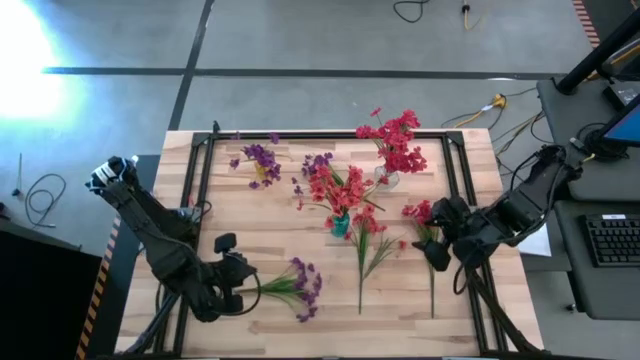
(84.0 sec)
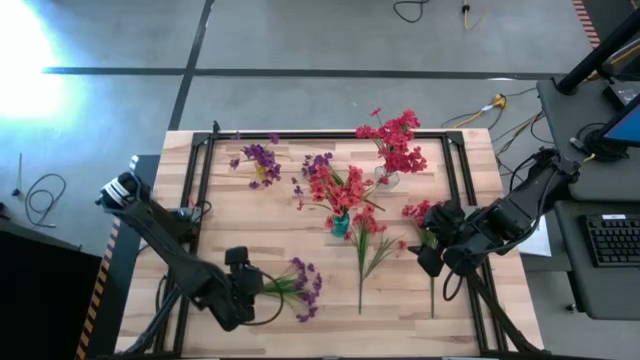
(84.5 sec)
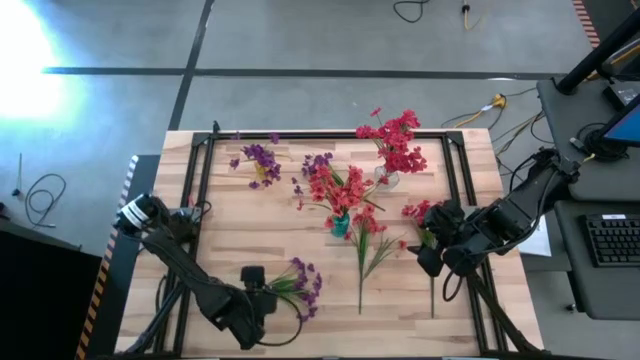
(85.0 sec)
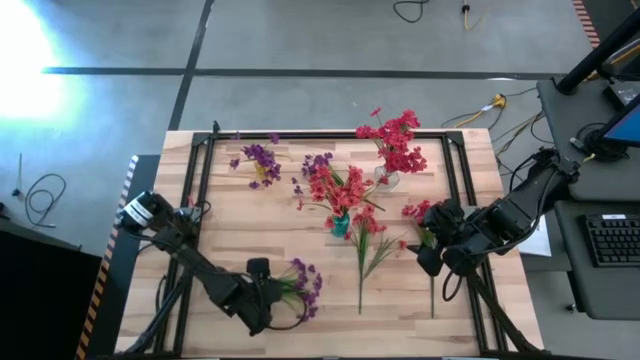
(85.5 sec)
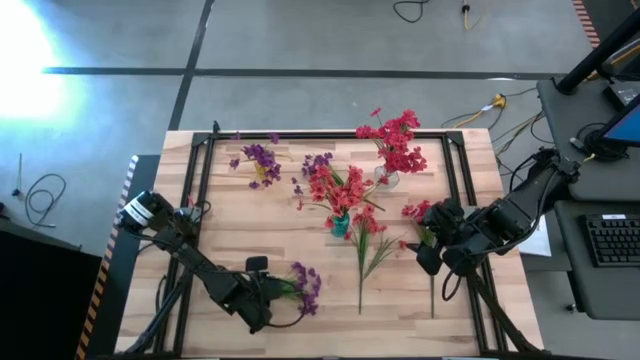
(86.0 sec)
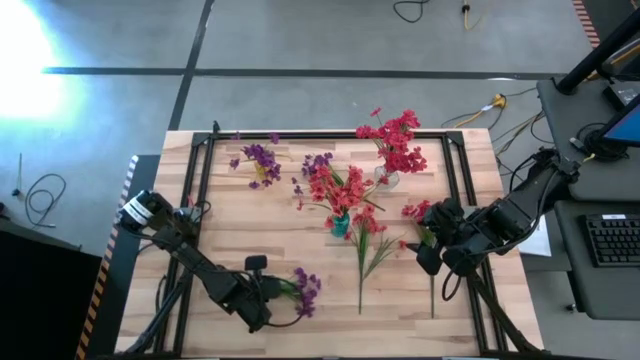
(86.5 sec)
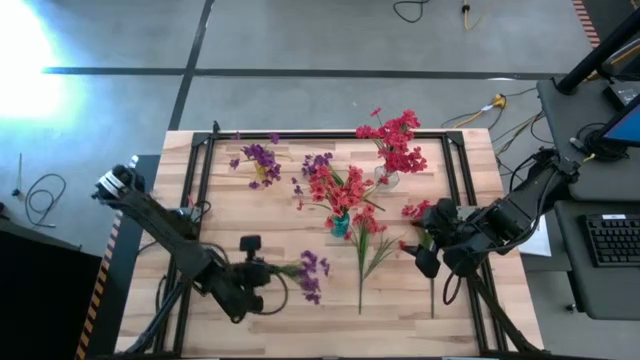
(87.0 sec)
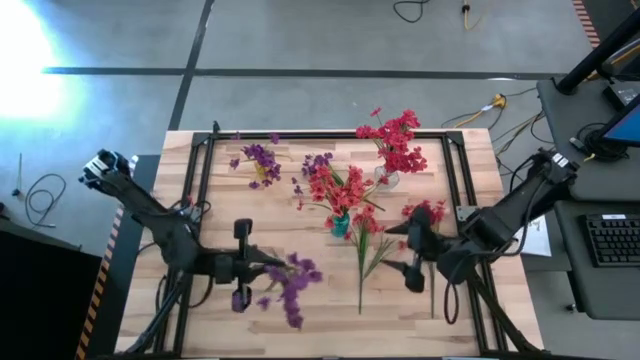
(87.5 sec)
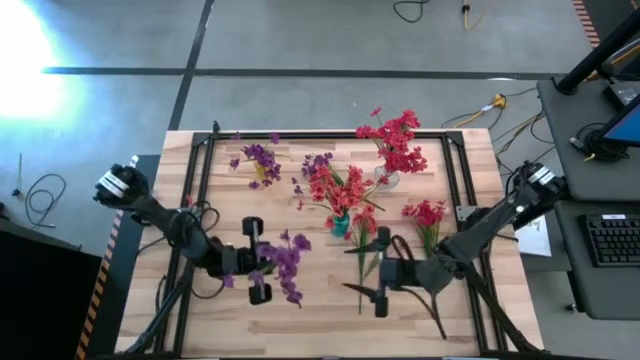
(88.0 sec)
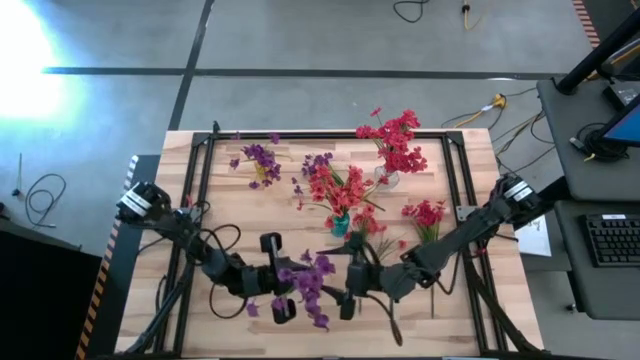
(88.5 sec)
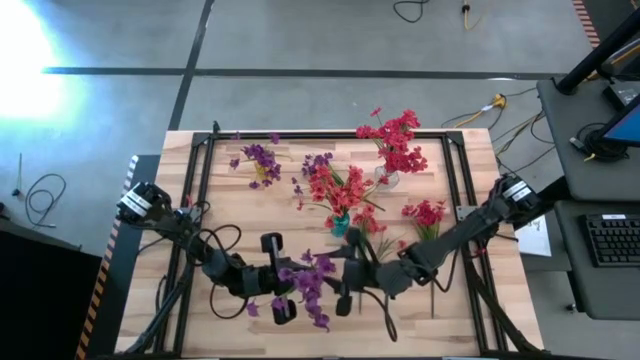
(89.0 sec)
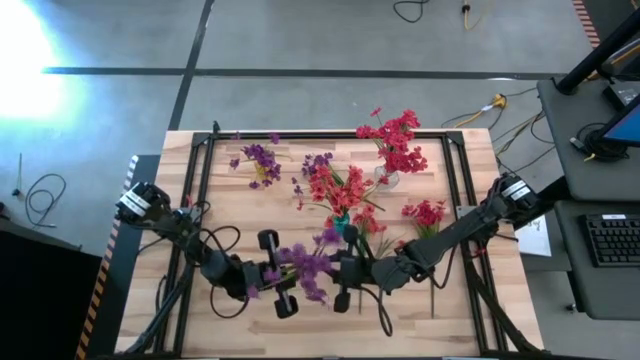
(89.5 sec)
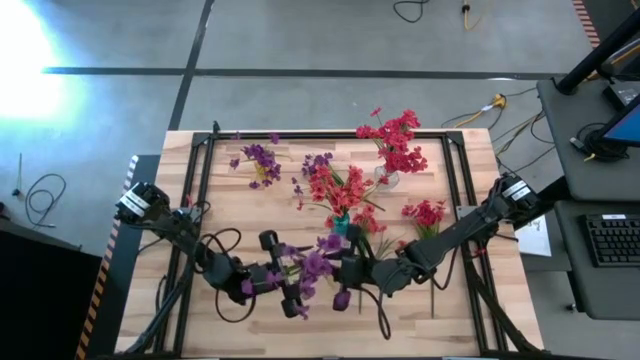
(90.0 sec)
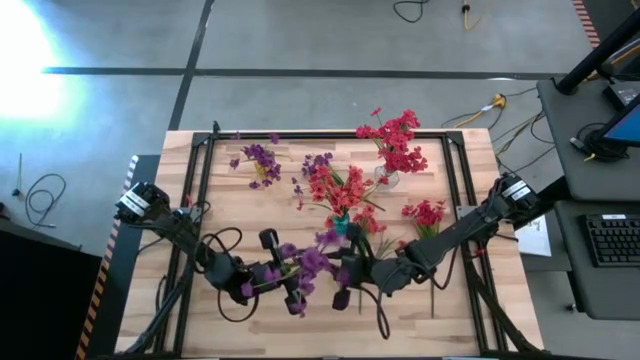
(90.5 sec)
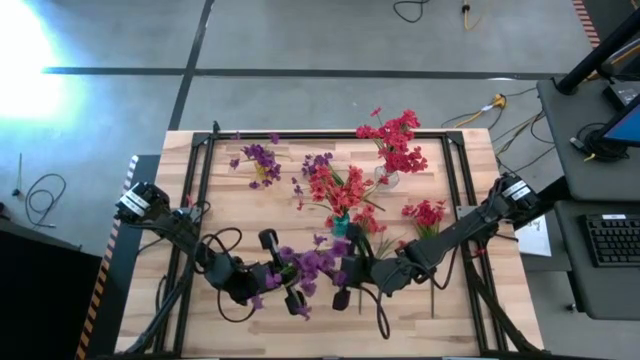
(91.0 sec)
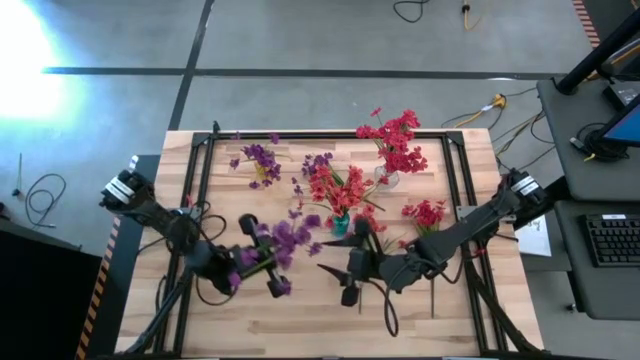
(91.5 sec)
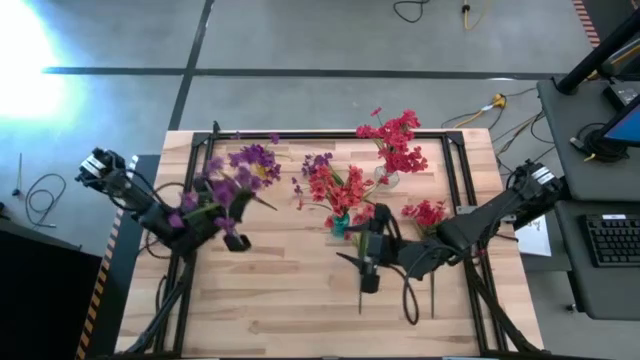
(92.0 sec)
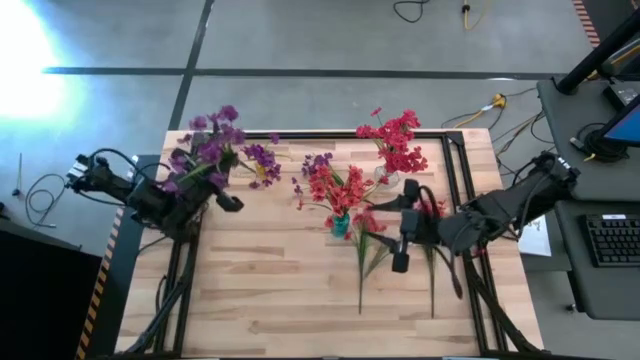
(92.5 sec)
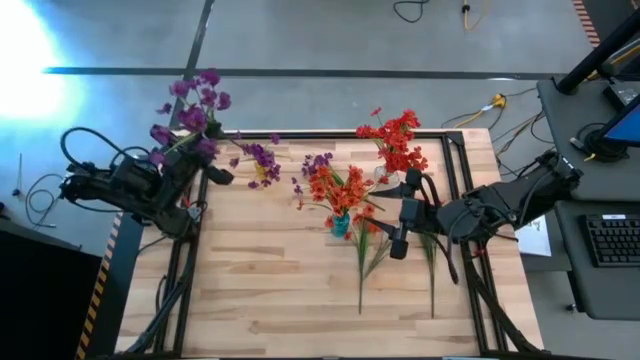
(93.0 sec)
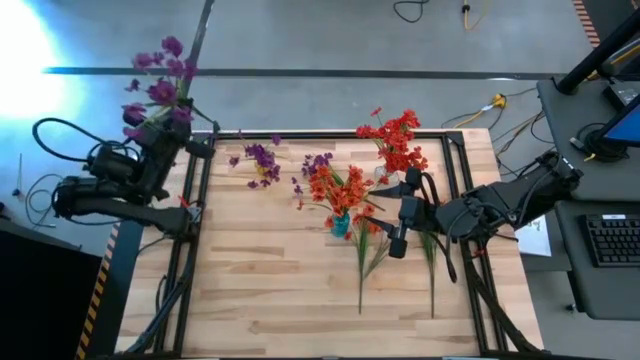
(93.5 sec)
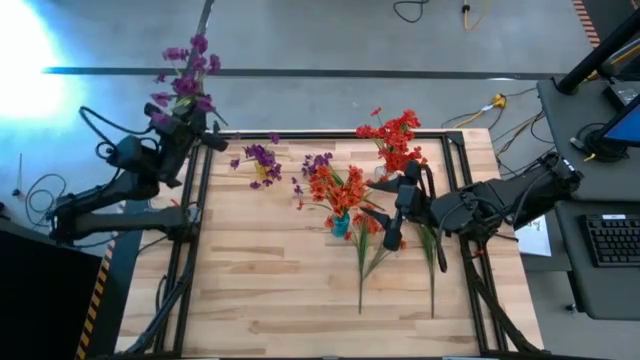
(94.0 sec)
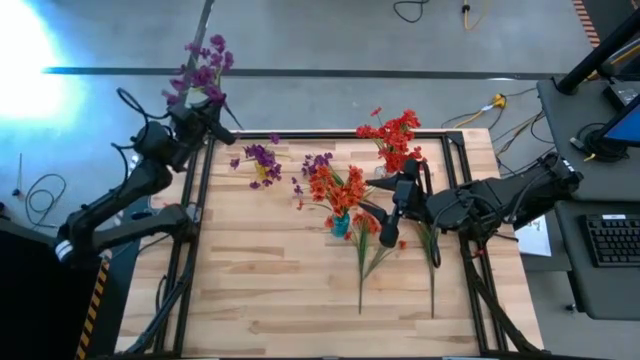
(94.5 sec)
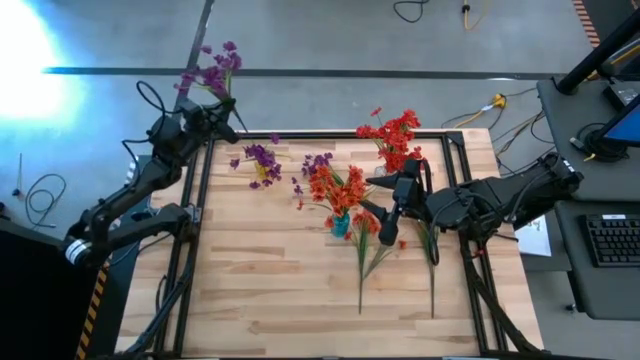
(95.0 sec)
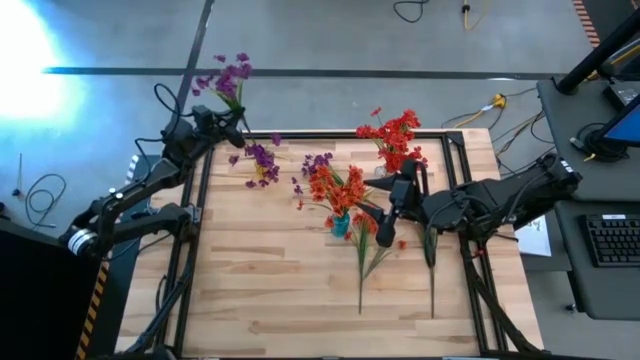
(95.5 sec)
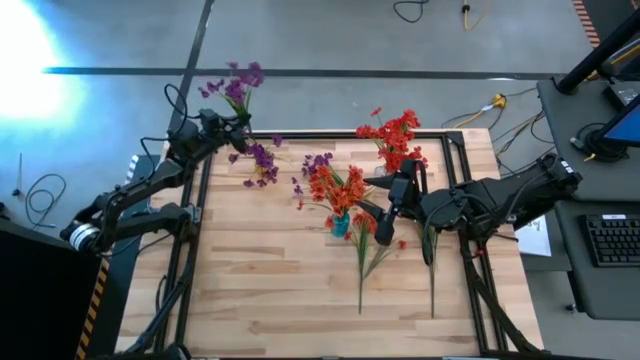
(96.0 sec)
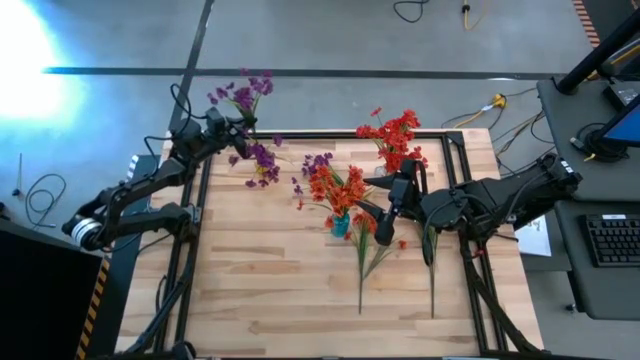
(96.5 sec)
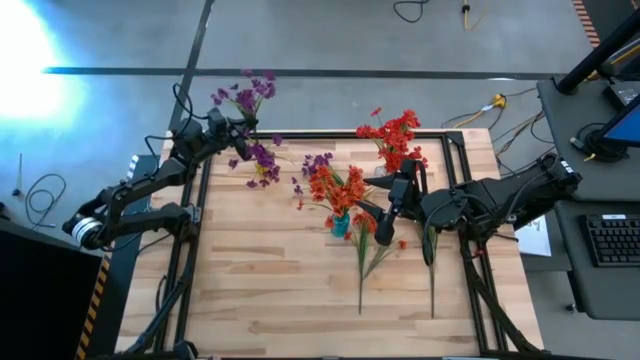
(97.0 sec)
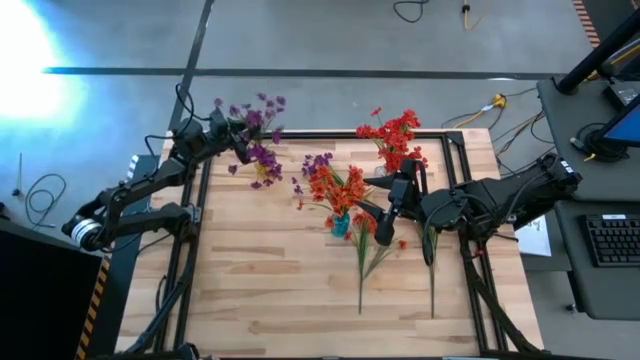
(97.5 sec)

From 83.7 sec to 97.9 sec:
Task: Sort flowers into vase by color
Put the bottom violet flowers into the yellow vase

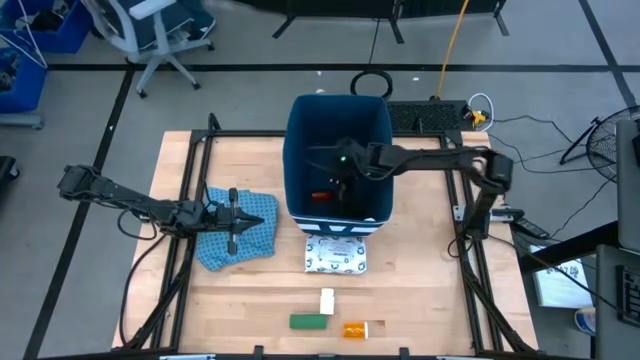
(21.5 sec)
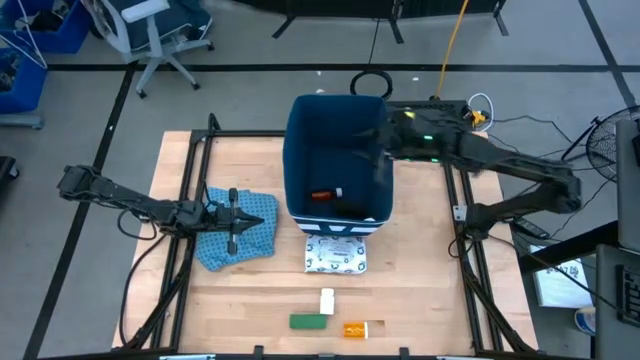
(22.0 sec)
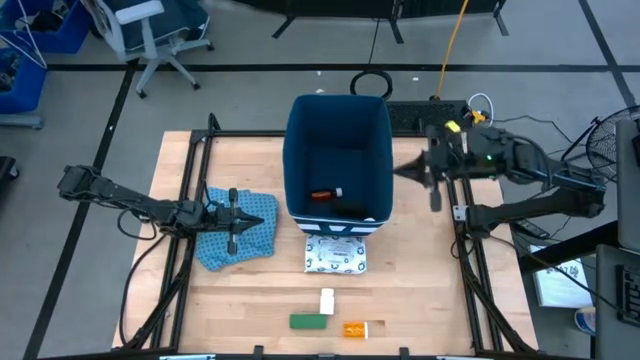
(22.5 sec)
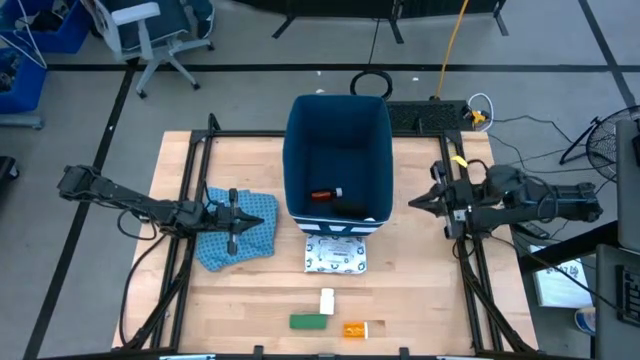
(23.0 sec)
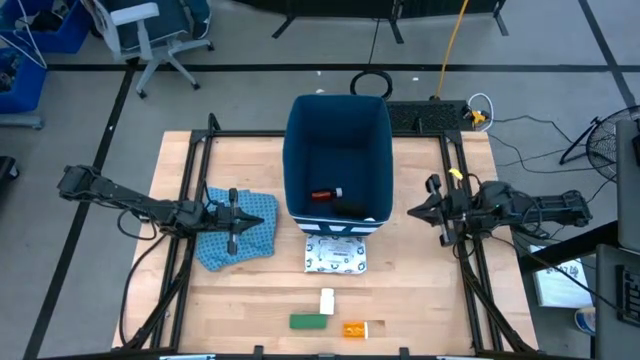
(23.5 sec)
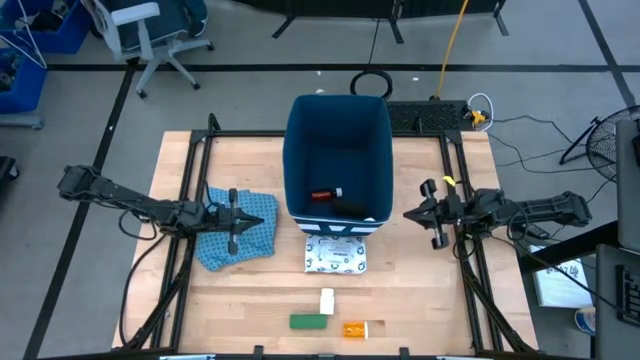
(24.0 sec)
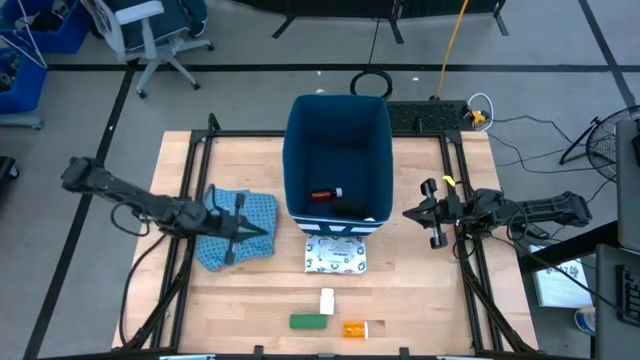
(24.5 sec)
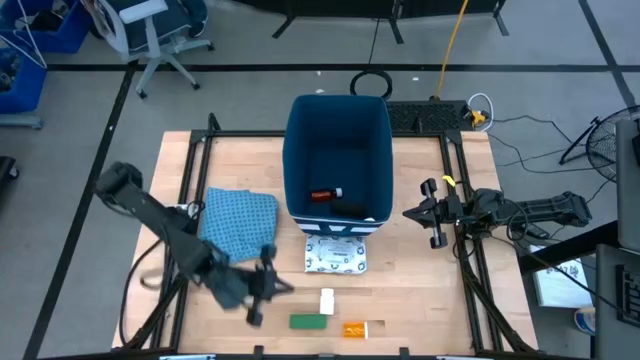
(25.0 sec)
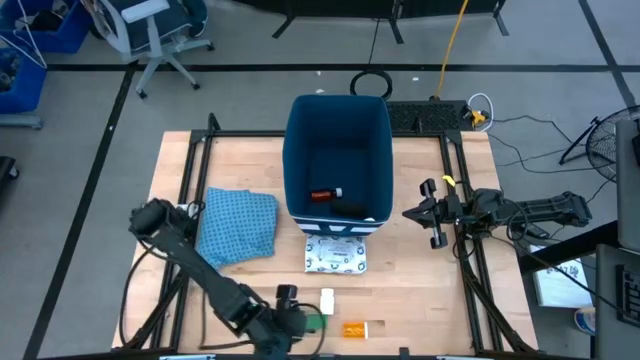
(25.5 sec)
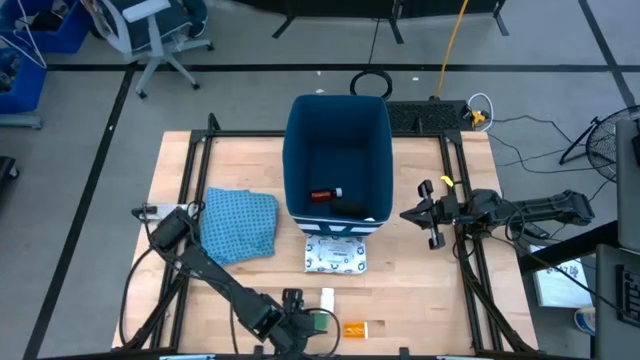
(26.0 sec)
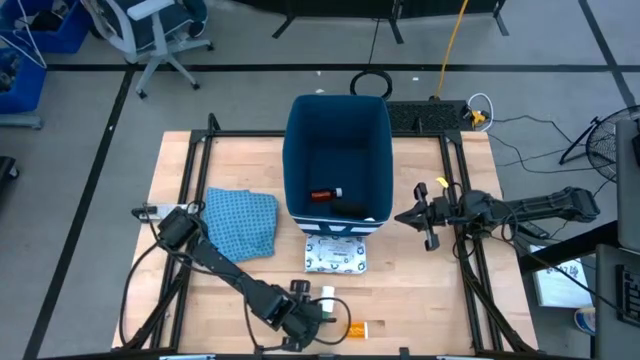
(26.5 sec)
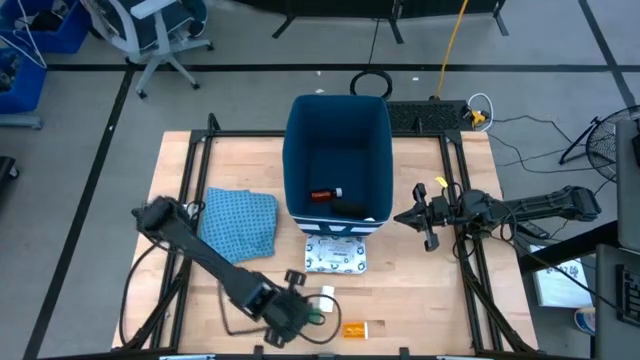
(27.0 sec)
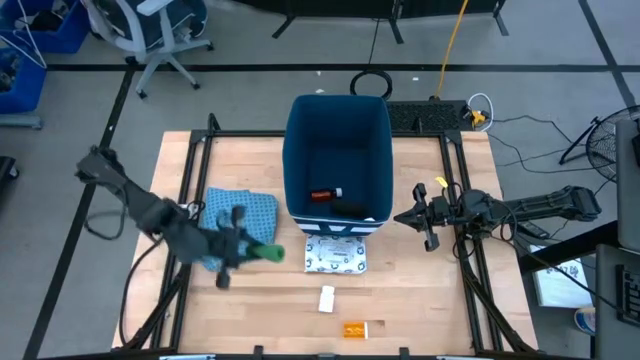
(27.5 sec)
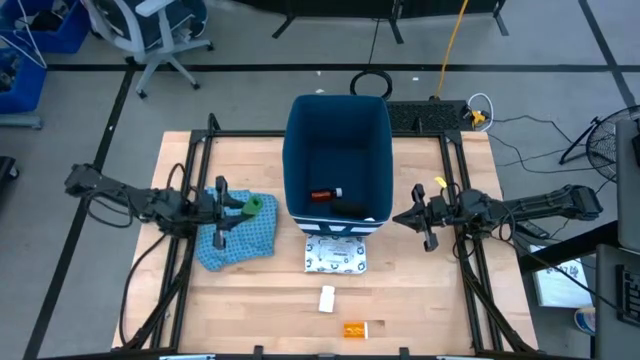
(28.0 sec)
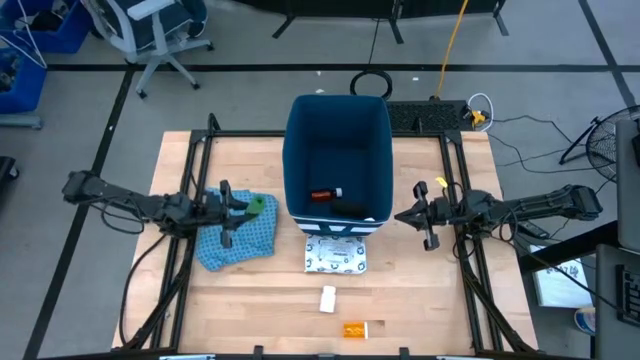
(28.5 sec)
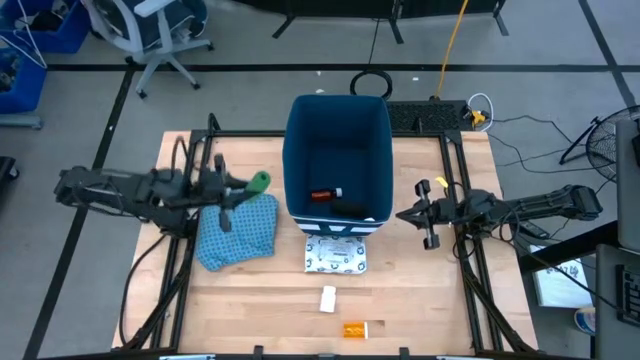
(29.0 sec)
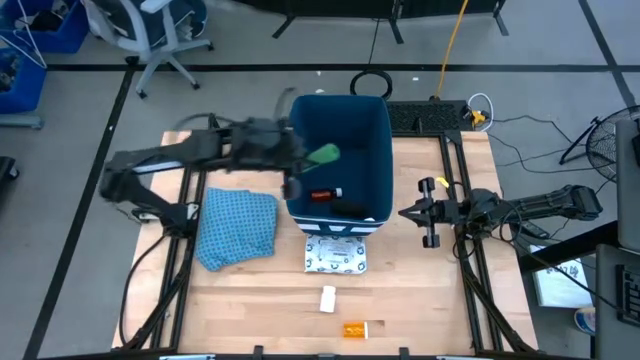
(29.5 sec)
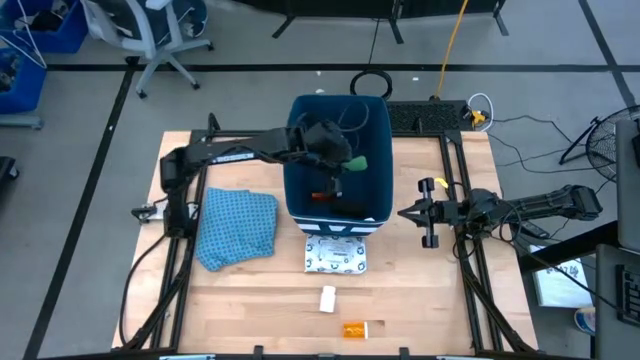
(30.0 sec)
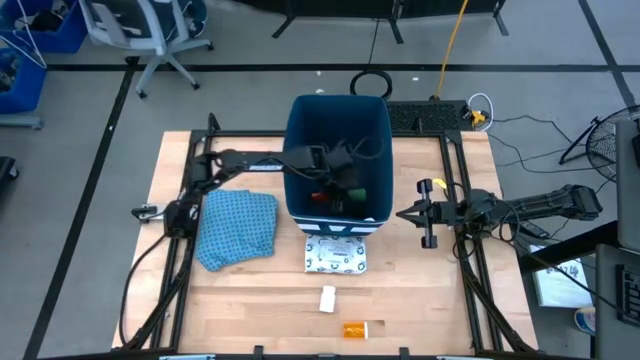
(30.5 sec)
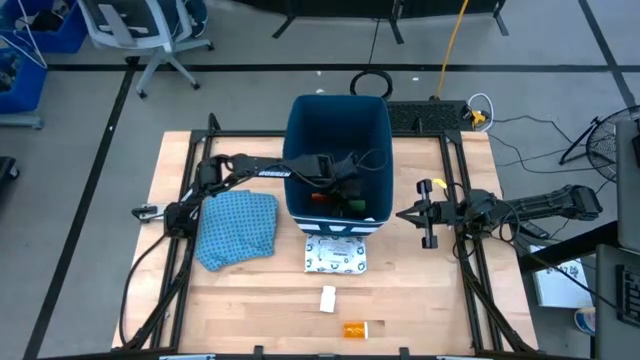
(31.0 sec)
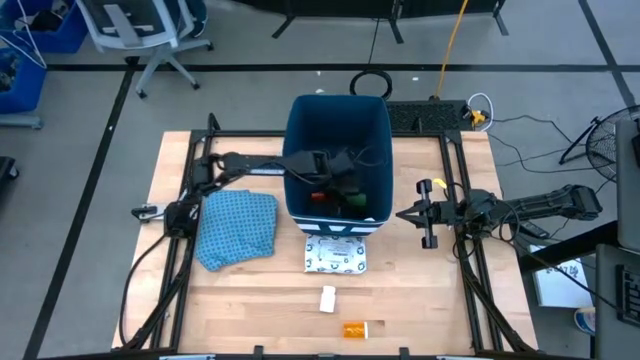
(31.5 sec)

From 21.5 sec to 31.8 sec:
Task: Pick & place medical supplies in basket/bin
Put the green bandage into the blue bin
